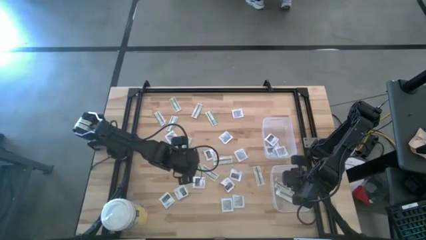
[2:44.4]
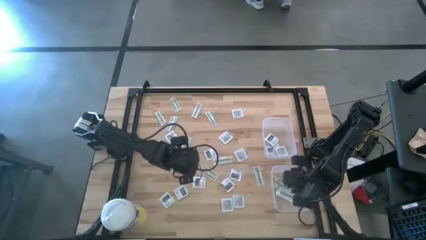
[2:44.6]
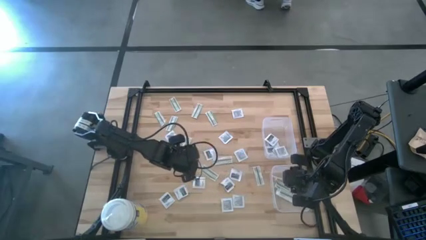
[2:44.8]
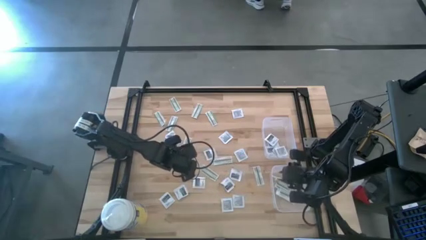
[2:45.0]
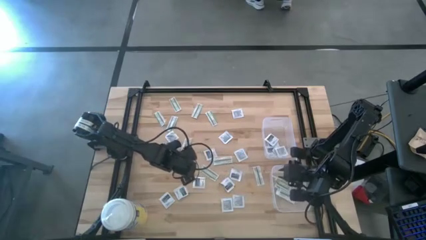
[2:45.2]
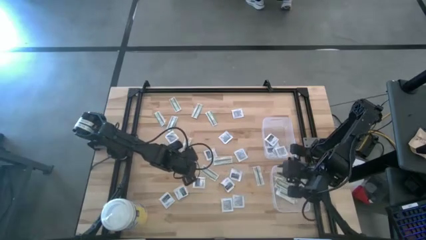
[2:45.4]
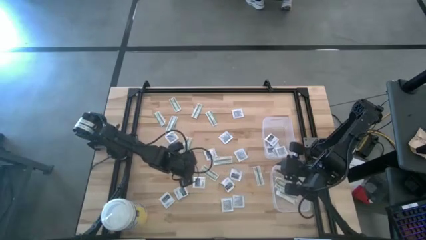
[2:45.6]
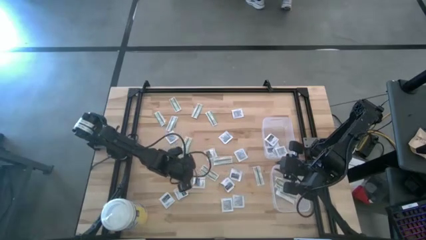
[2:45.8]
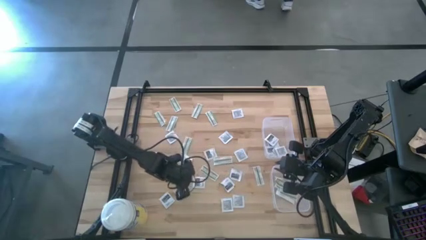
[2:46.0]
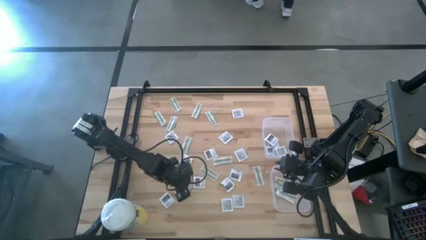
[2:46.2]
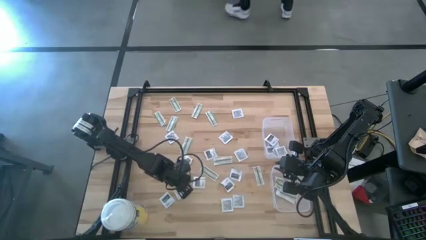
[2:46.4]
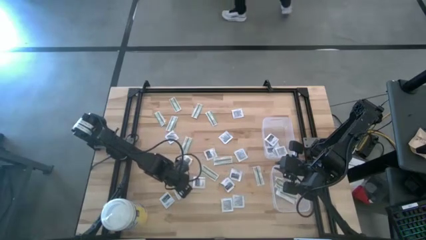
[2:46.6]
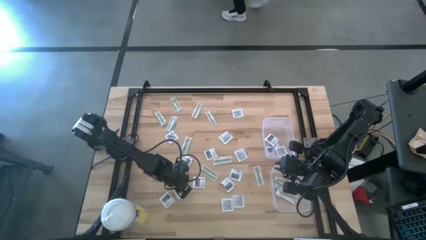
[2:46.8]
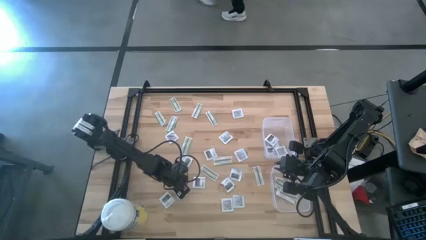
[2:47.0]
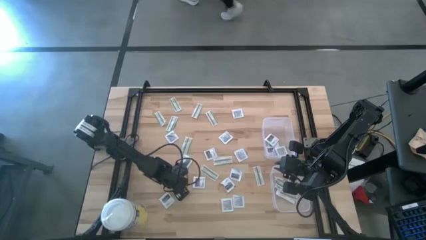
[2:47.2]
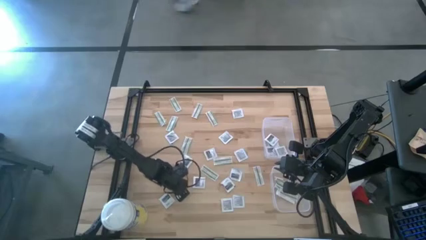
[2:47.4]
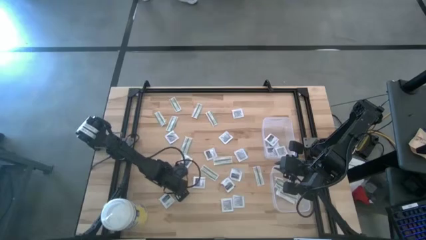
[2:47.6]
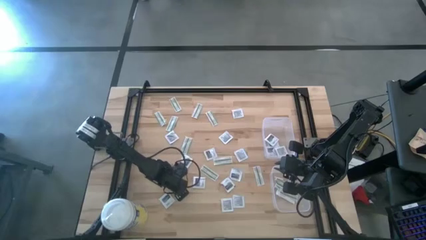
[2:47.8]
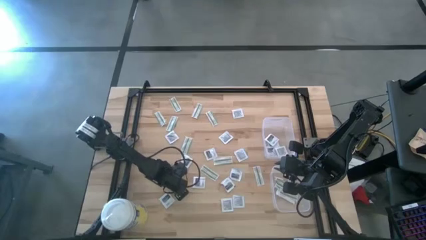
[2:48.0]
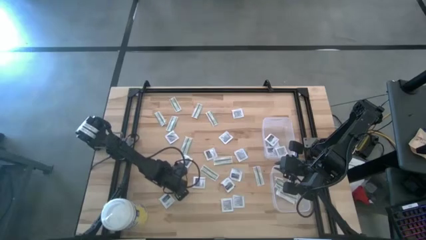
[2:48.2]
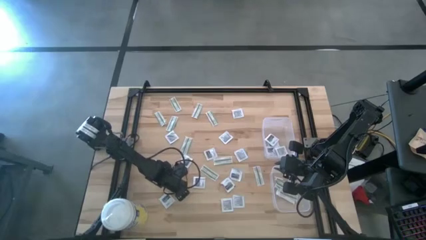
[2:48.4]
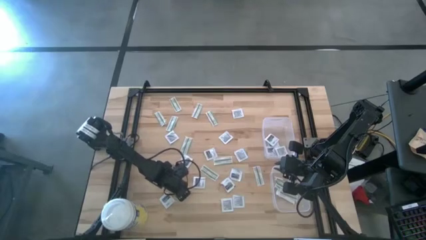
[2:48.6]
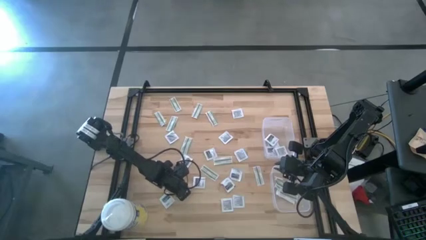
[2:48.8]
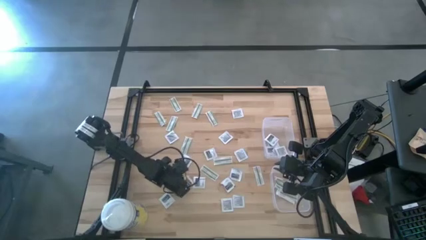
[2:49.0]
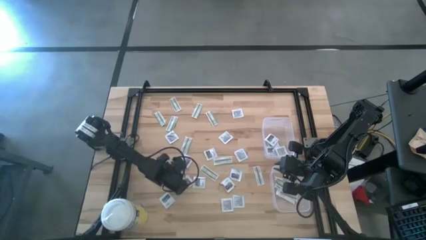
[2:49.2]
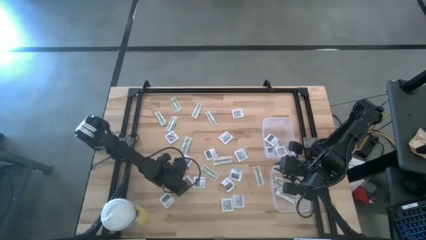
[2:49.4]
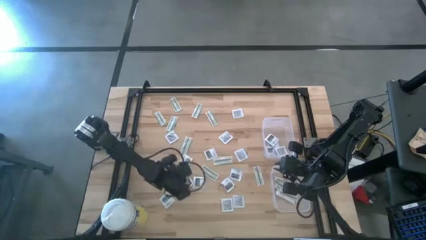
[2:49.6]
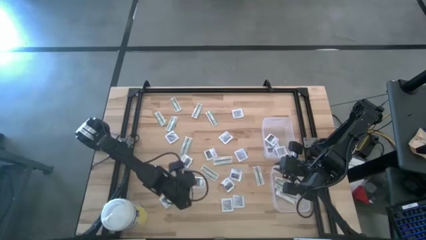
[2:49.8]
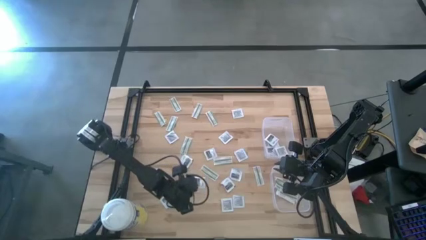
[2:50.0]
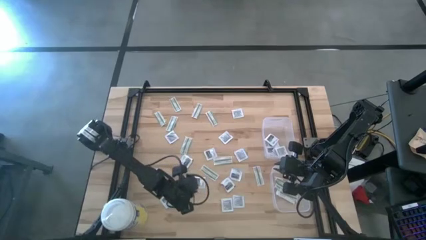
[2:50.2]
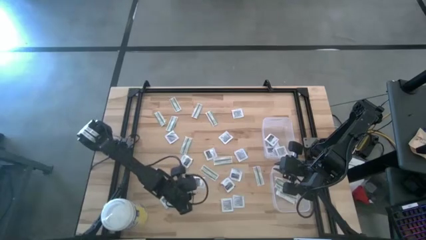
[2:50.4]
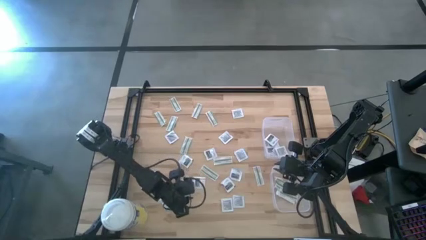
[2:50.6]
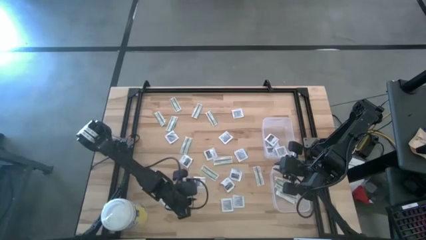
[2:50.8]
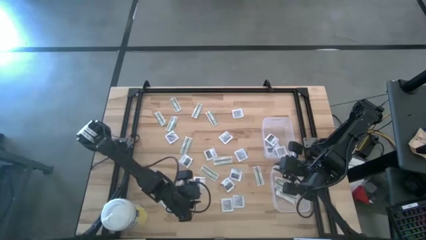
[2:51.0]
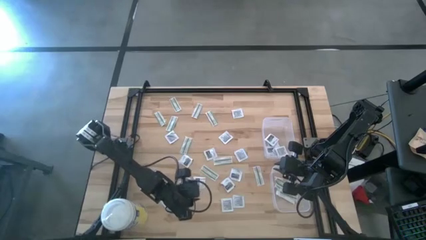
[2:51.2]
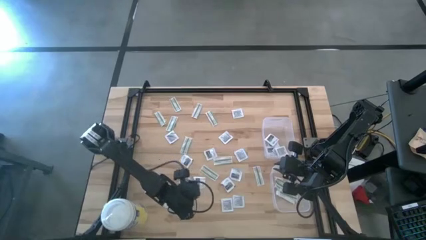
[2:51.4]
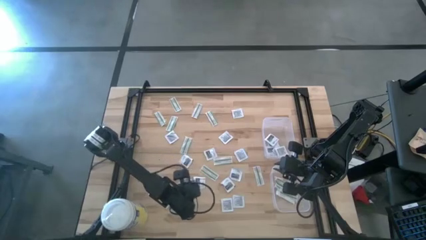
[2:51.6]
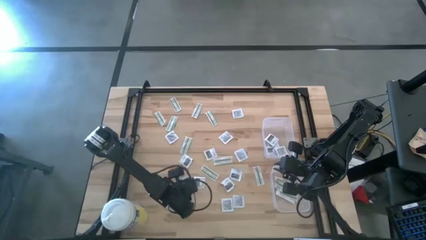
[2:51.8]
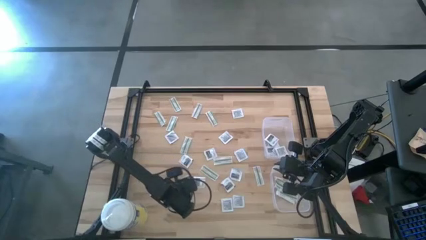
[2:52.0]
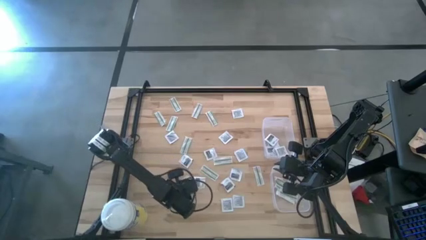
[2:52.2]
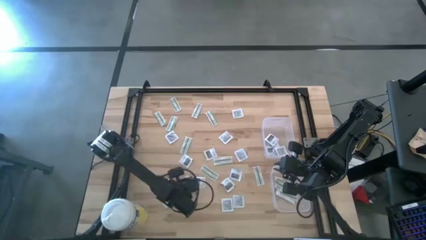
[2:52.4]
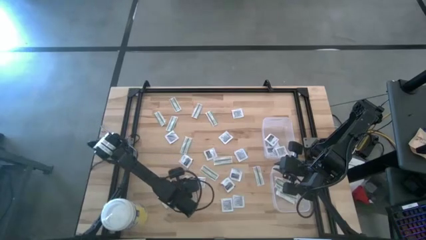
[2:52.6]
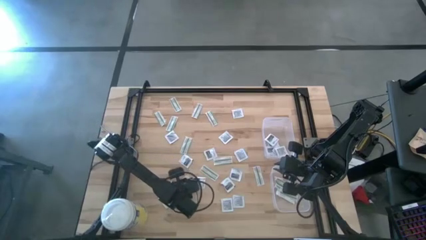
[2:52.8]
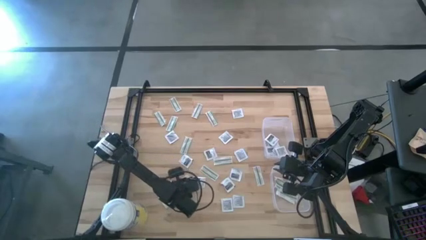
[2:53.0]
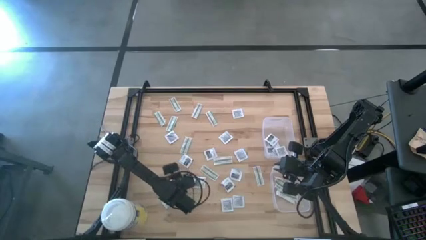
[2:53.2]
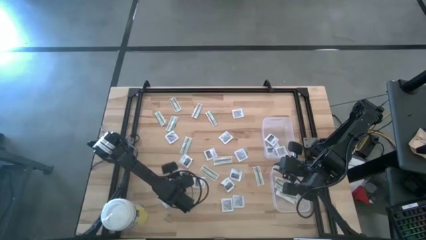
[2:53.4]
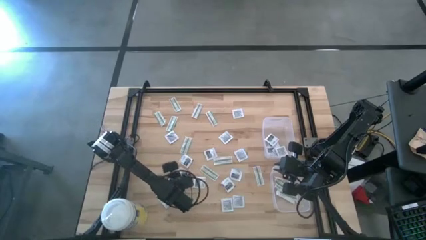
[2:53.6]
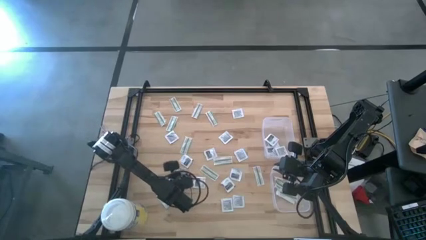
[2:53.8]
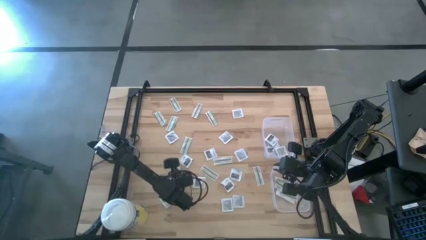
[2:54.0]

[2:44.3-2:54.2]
Task: Pick & Place First Aid Supplies
Put the towelette pack into the top bin

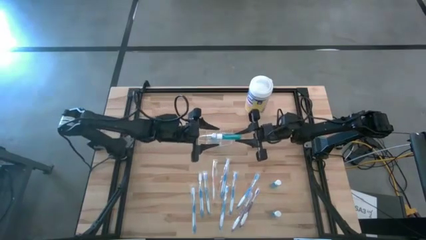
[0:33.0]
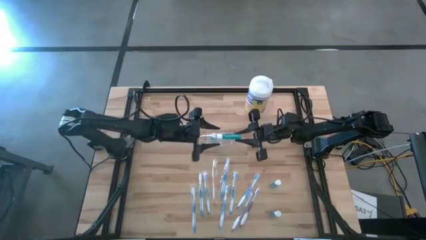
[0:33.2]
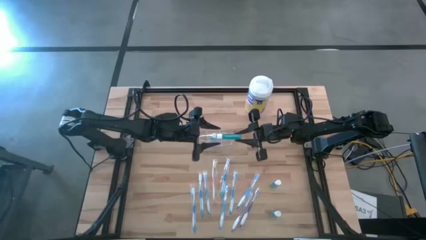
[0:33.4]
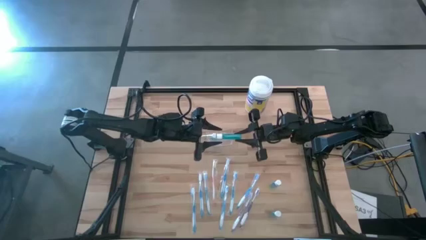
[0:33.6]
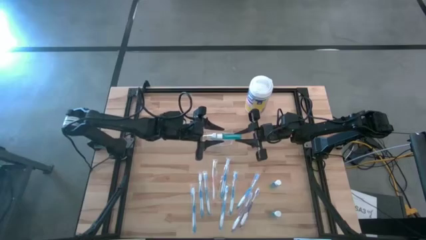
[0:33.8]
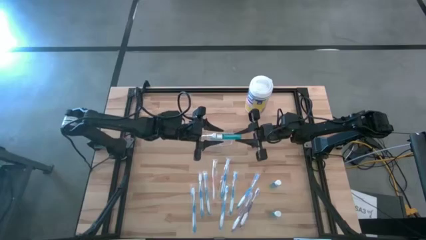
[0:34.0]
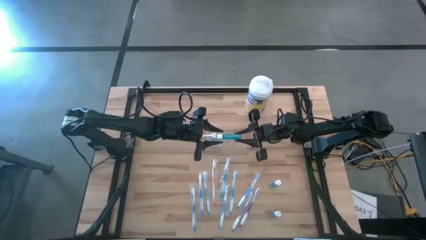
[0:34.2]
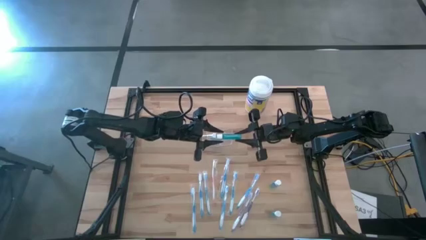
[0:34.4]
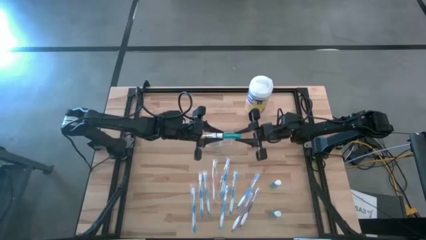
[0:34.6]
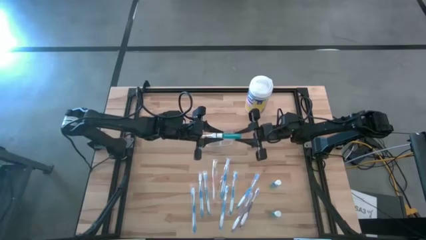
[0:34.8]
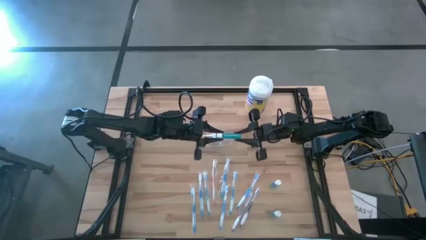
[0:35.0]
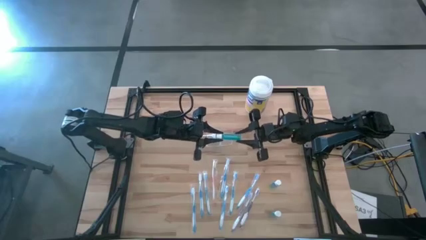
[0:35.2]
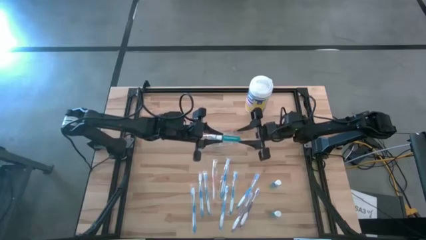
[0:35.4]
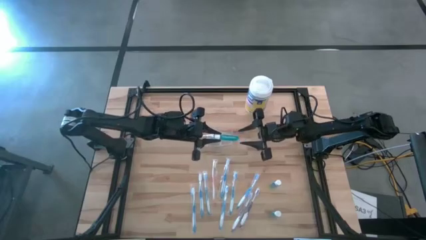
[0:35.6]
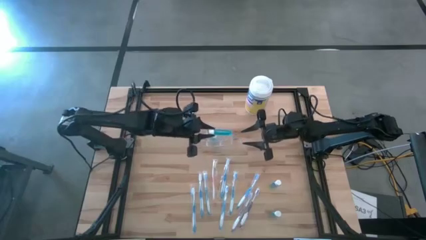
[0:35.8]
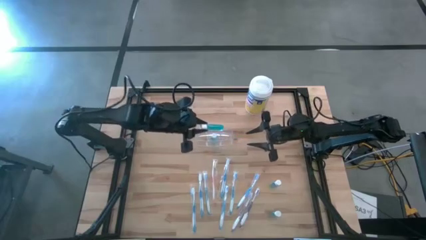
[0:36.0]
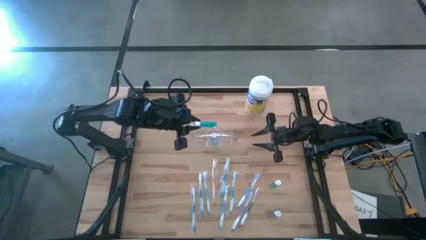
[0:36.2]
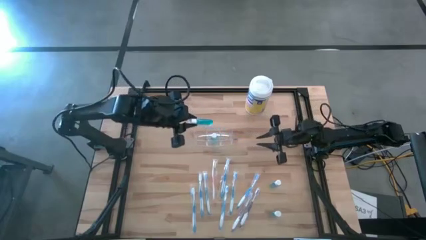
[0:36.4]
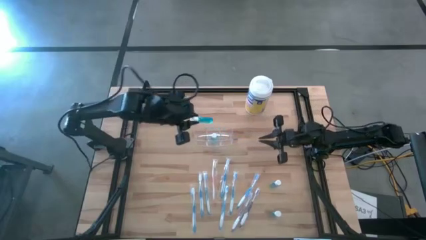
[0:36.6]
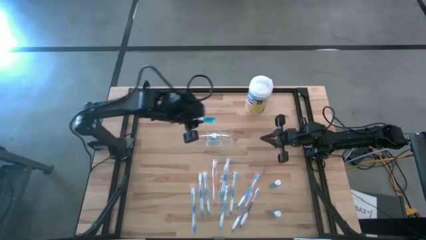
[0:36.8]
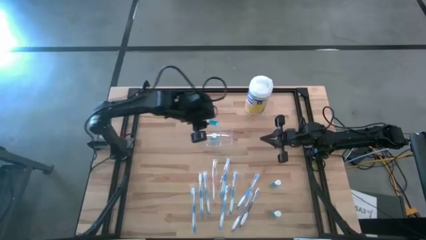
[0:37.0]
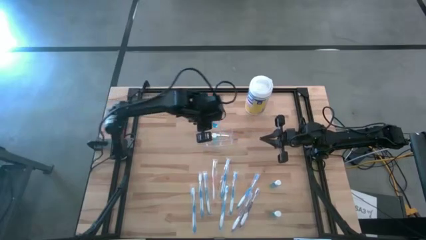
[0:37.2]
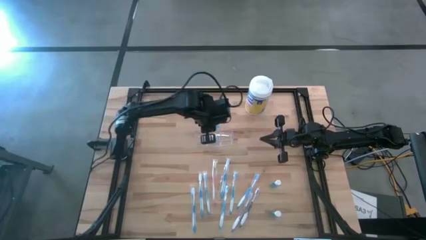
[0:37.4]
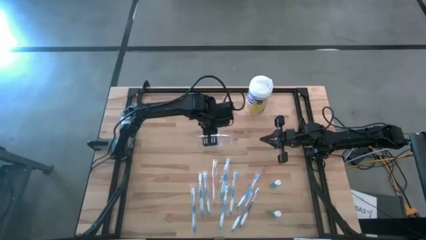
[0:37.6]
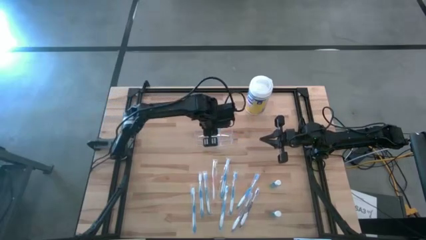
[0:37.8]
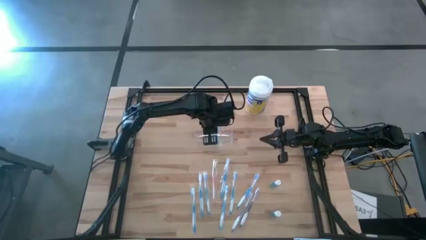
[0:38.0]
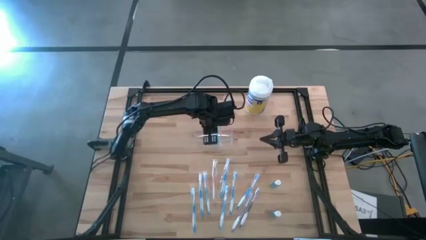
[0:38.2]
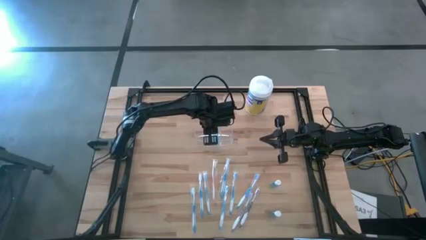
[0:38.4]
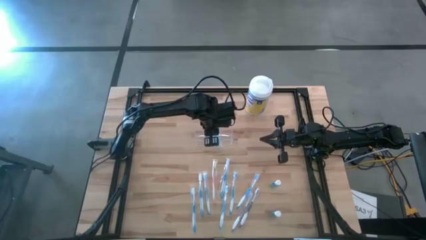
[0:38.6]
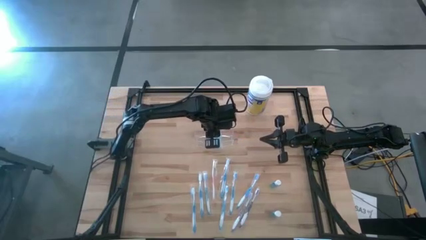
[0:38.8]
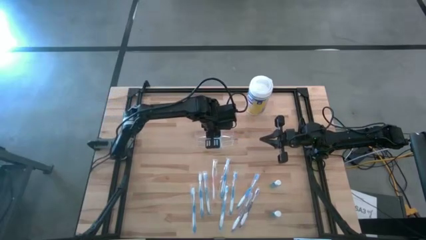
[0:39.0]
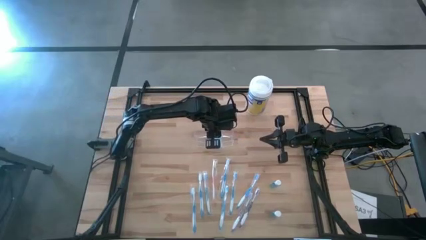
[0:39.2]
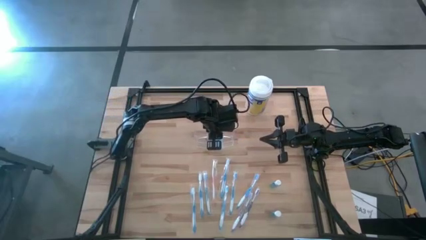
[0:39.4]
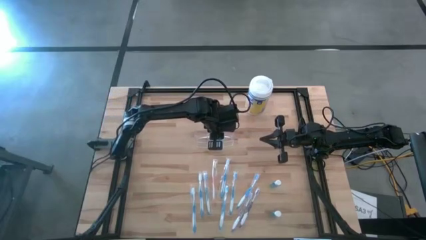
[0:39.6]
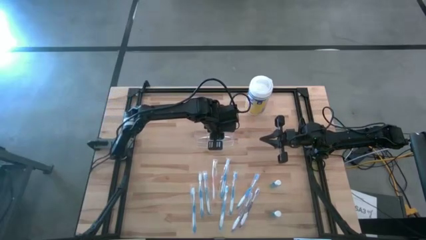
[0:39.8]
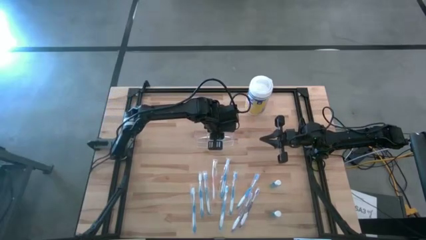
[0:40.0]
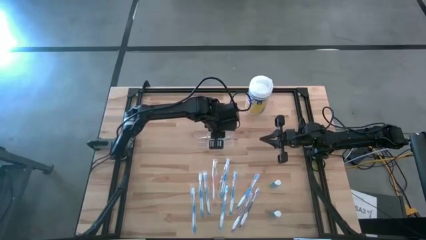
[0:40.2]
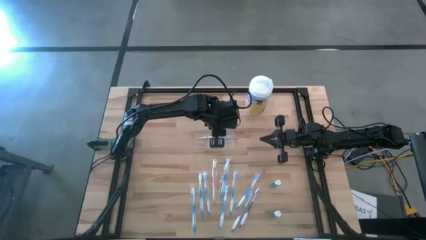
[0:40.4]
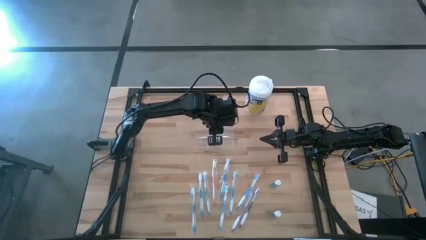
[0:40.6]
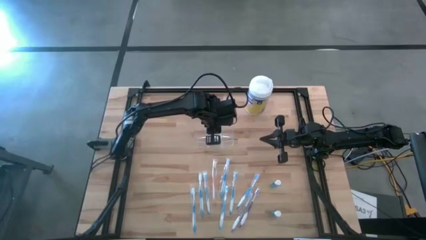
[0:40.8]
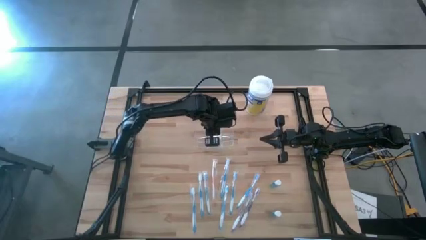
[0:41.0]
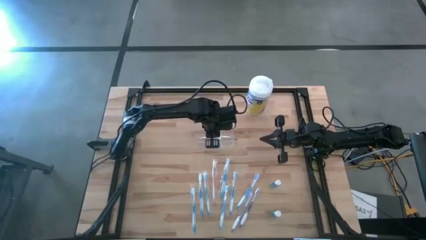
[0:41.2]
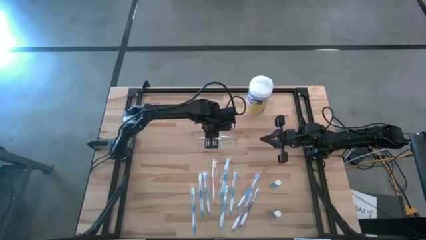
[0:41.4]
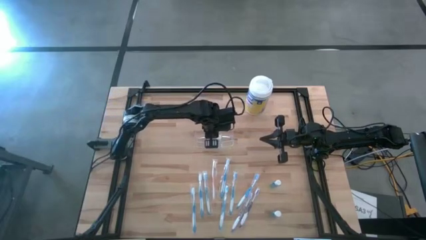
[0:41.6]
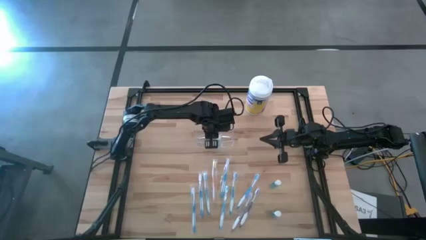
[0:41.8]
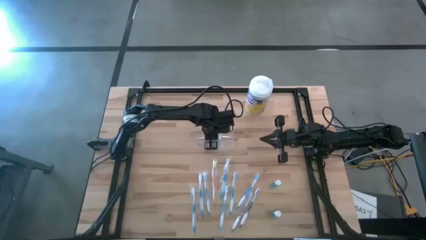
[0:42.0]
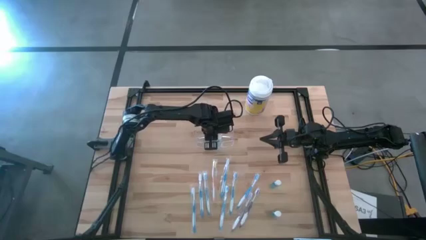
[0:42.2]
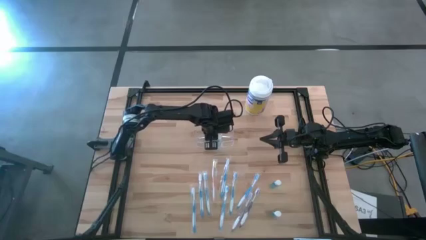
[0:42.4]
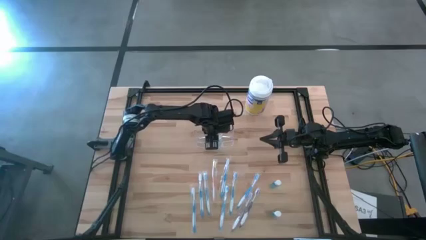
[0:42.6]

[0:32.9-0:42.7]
Task: Pick & Place toothbrushing station
Put the blue mouthwash into the transparent organizer
